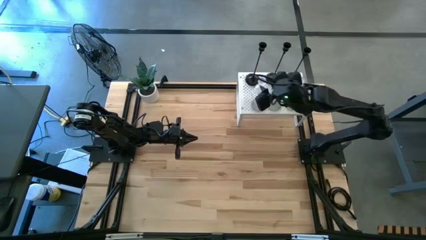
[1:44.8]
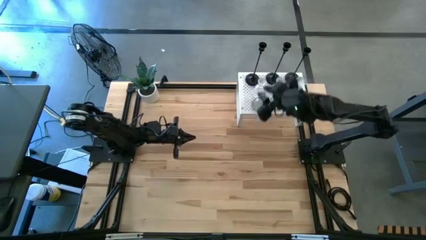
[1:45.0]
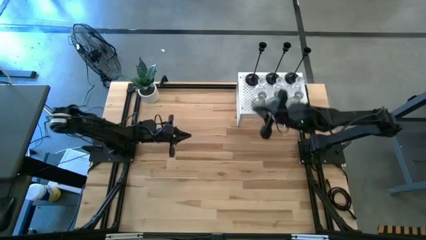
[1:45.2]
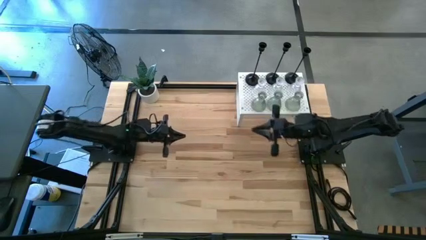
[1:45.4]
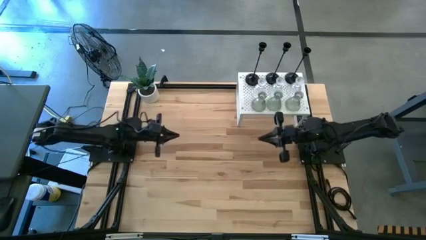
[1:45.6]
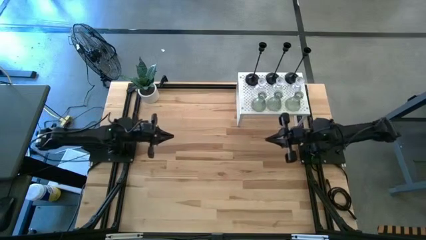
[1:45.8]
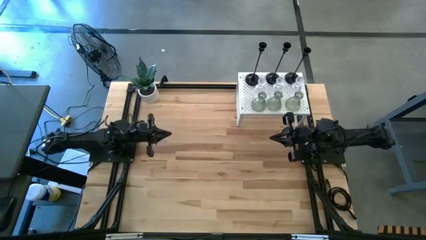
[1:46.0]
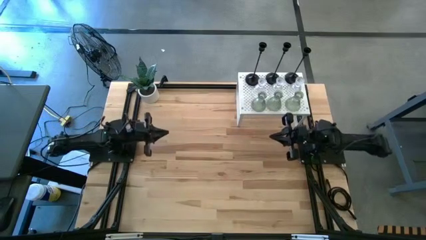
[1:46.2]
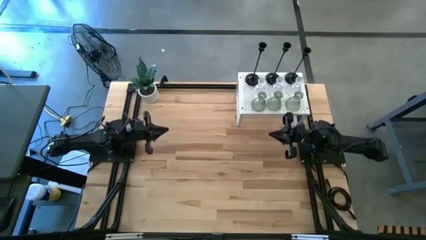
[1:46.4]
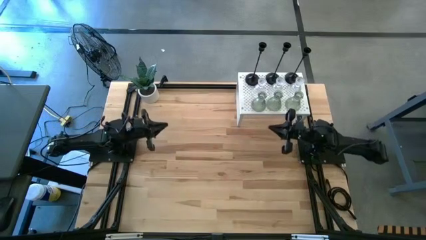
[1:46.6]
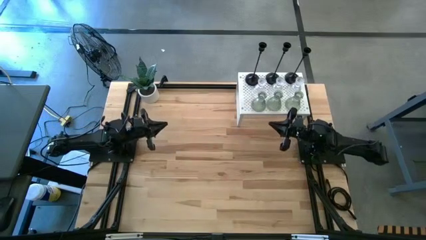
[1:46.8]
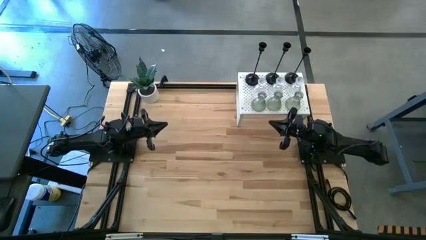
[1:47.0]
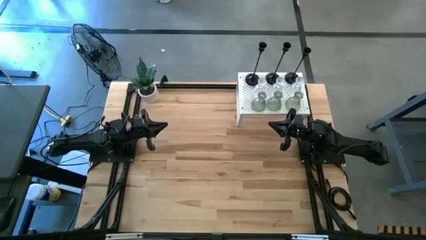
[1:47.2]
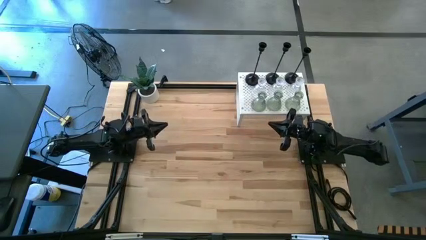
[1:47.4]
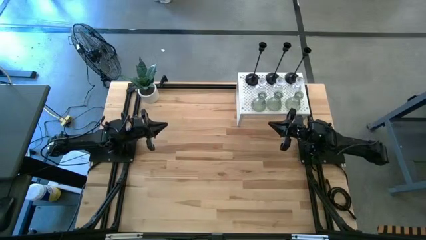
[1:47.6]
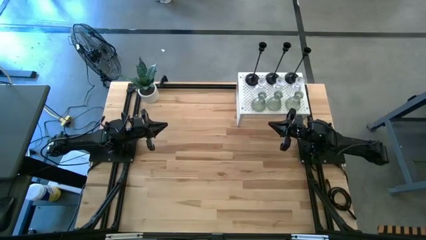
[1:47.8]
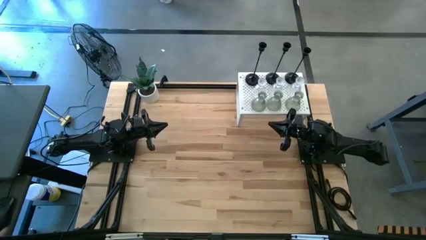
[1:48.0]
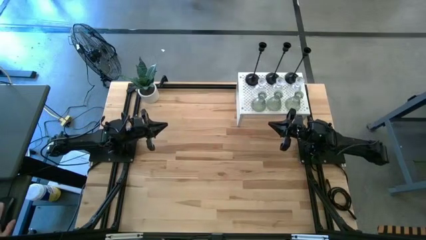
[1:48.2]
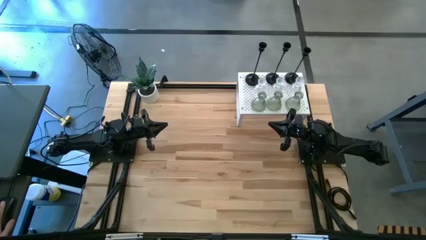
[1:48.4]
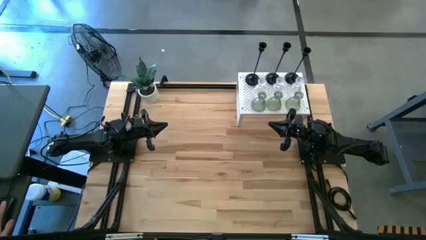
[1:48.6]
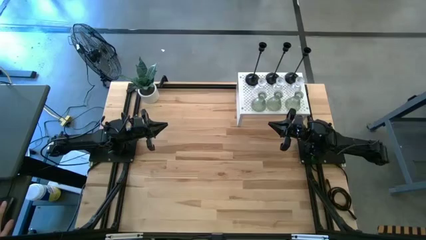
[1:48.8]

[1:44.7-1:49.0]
Task: Pick & Place candle stick holders
Return to Home Position

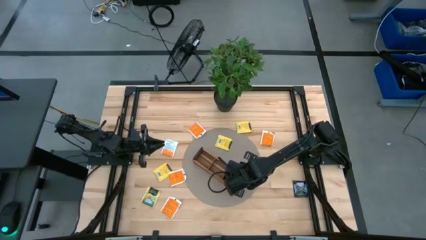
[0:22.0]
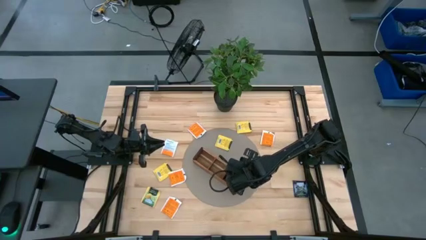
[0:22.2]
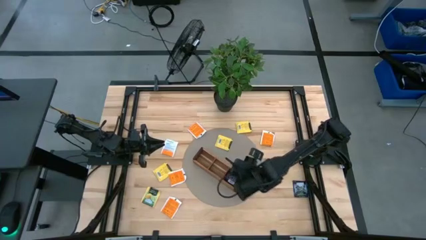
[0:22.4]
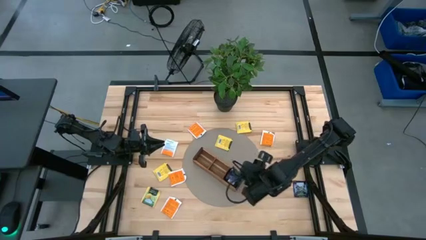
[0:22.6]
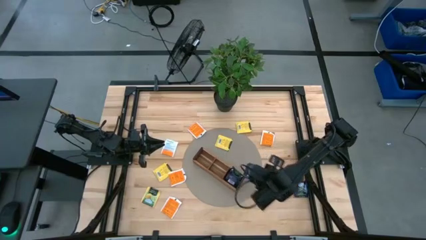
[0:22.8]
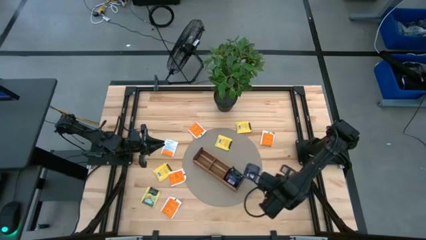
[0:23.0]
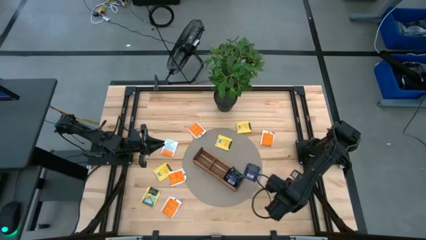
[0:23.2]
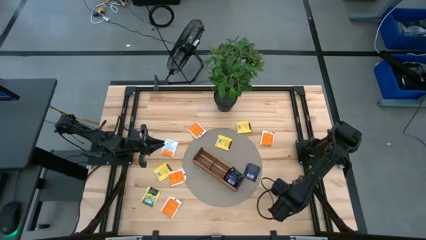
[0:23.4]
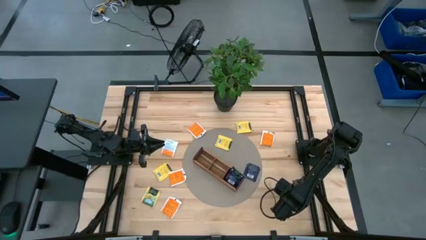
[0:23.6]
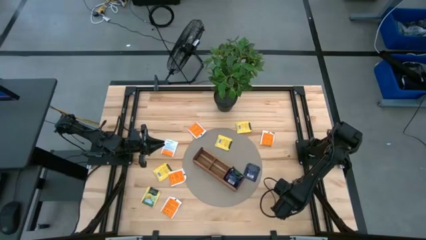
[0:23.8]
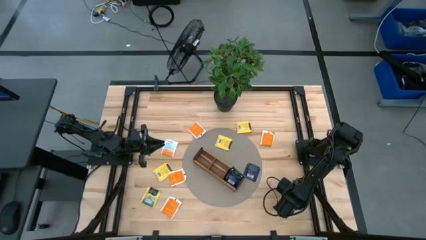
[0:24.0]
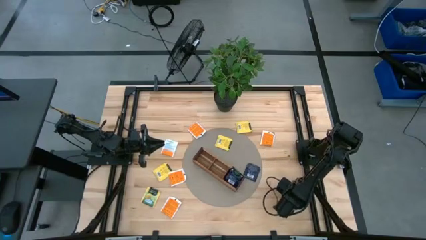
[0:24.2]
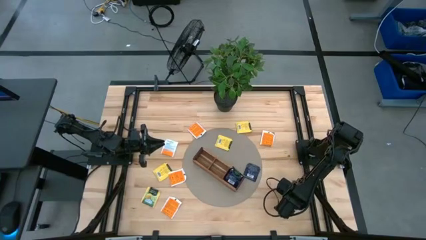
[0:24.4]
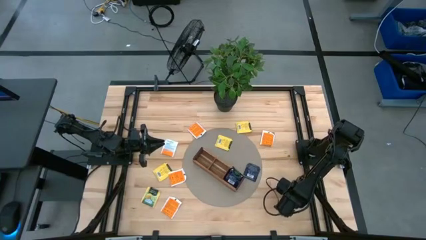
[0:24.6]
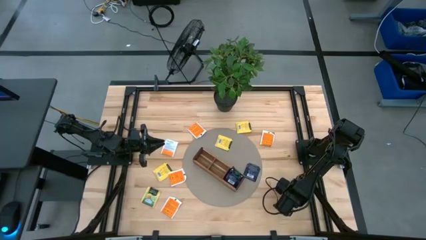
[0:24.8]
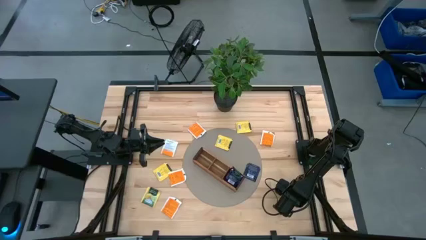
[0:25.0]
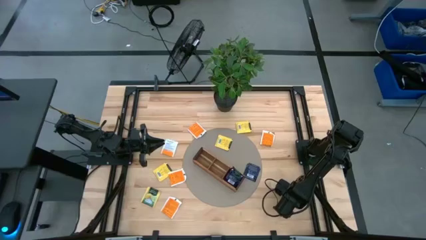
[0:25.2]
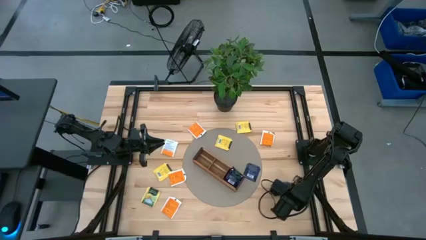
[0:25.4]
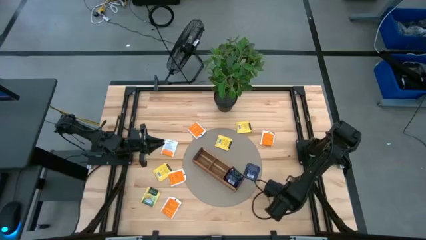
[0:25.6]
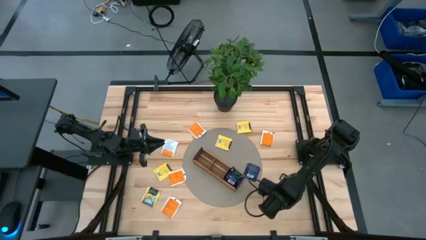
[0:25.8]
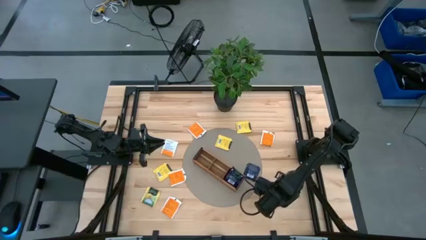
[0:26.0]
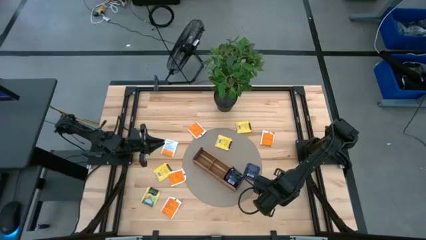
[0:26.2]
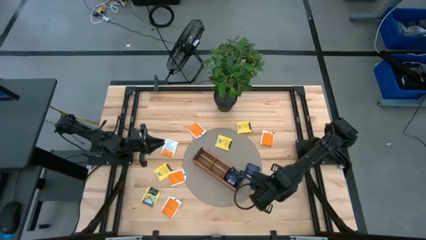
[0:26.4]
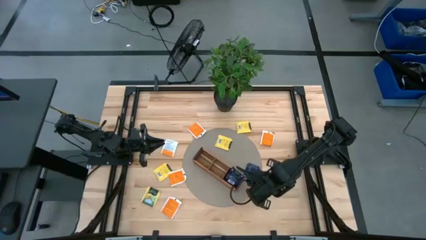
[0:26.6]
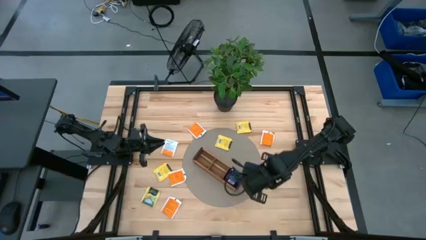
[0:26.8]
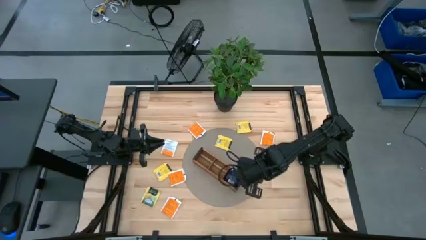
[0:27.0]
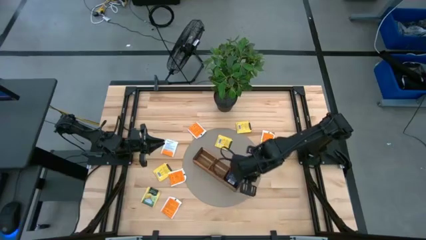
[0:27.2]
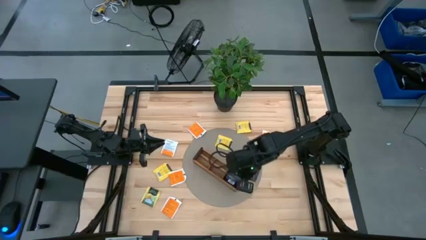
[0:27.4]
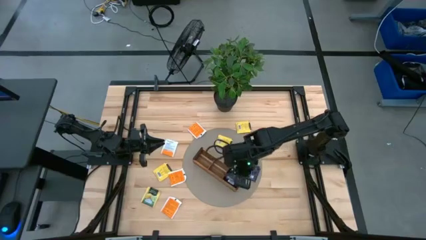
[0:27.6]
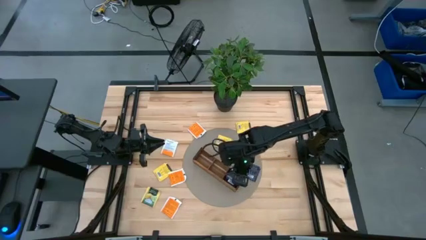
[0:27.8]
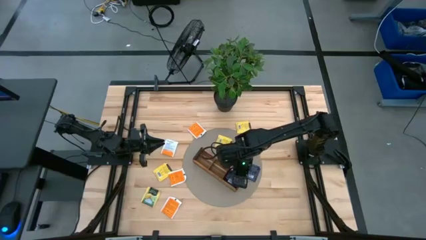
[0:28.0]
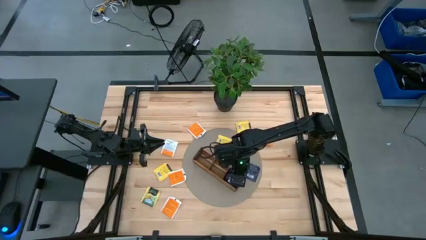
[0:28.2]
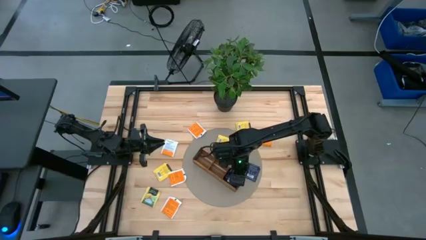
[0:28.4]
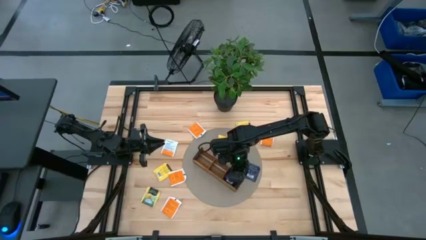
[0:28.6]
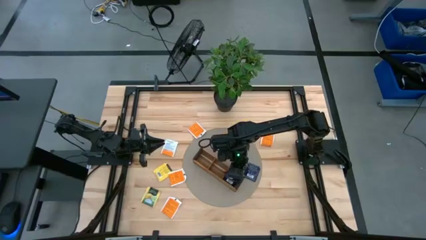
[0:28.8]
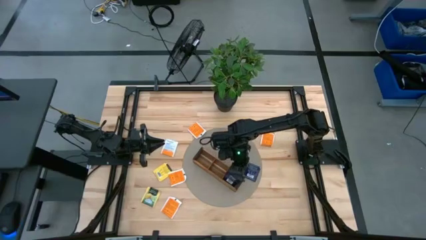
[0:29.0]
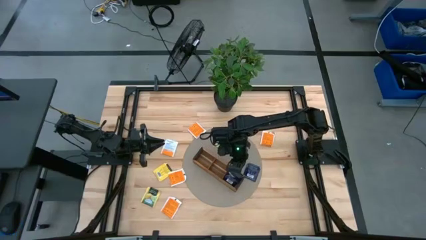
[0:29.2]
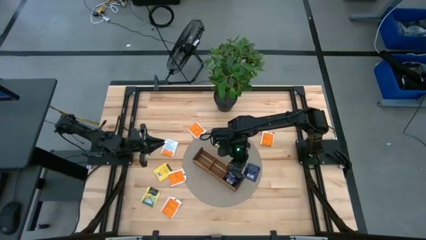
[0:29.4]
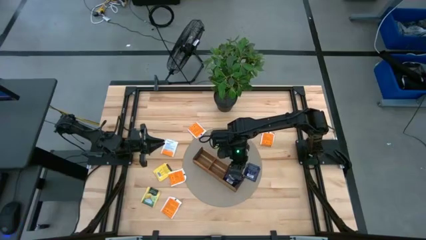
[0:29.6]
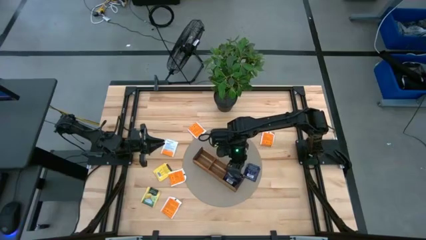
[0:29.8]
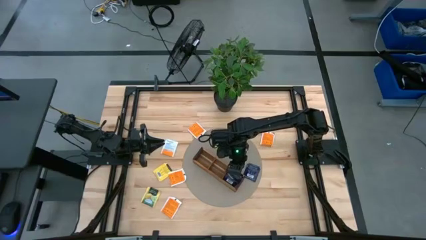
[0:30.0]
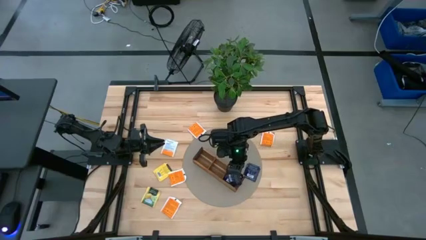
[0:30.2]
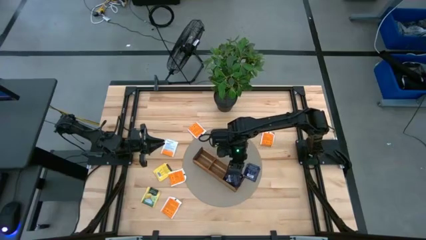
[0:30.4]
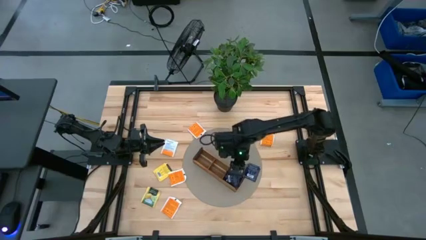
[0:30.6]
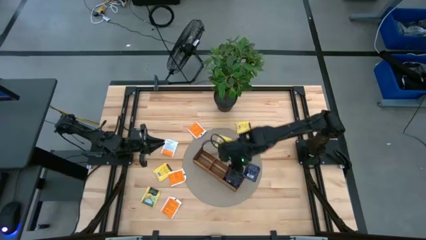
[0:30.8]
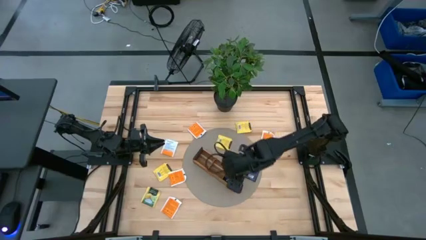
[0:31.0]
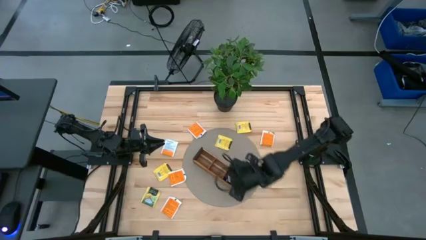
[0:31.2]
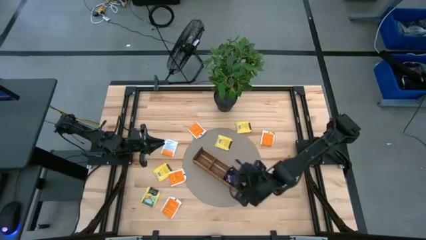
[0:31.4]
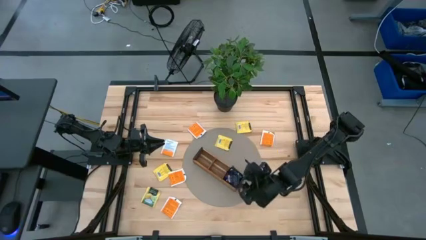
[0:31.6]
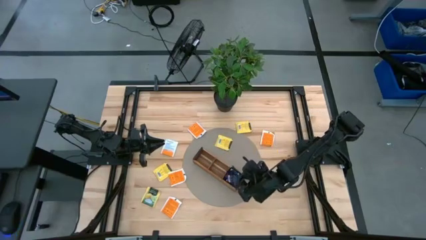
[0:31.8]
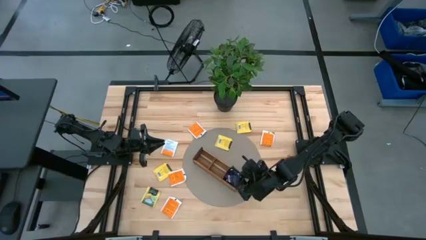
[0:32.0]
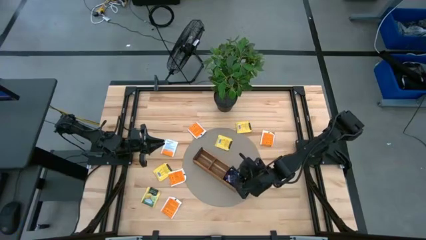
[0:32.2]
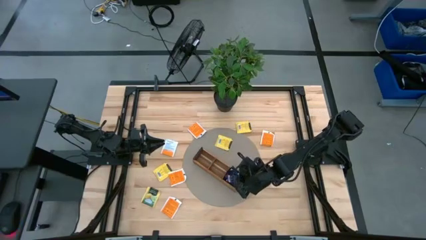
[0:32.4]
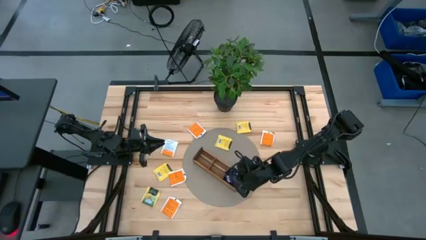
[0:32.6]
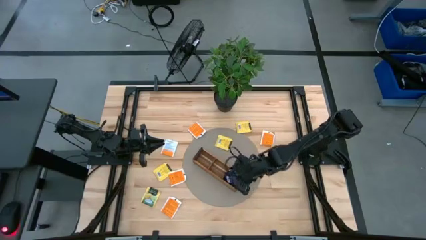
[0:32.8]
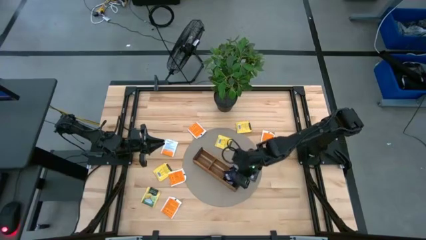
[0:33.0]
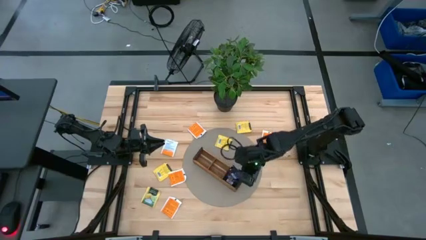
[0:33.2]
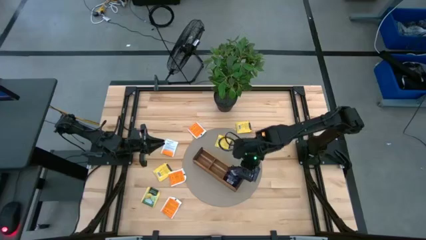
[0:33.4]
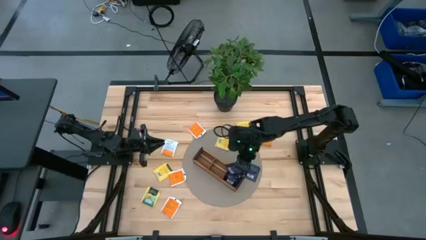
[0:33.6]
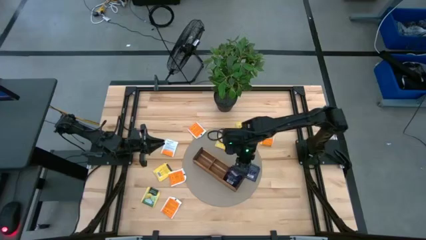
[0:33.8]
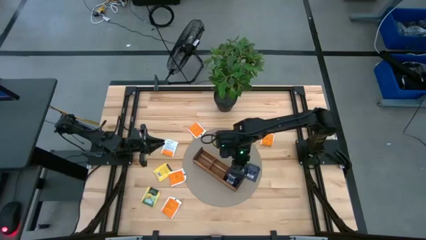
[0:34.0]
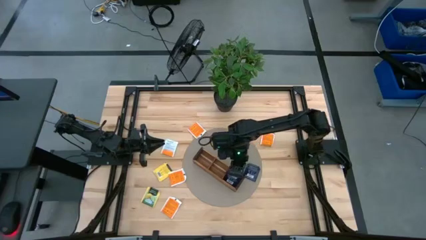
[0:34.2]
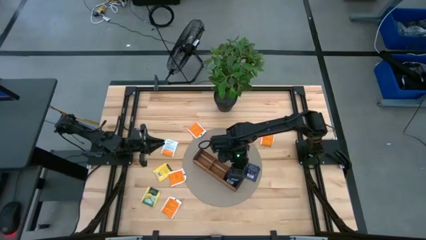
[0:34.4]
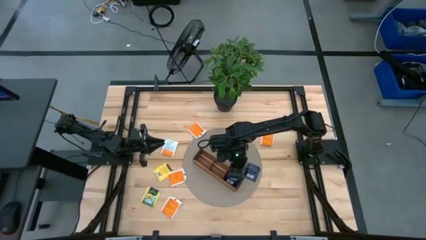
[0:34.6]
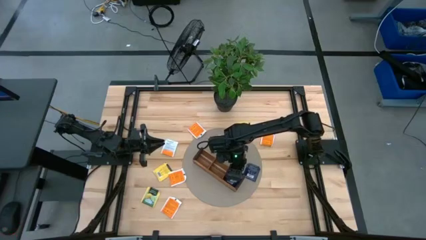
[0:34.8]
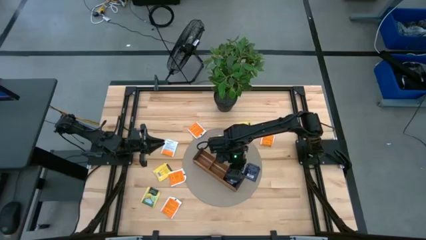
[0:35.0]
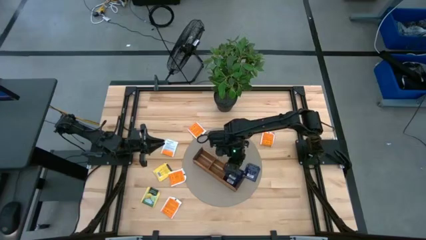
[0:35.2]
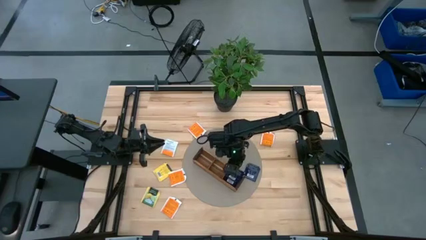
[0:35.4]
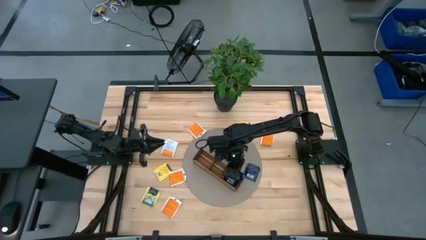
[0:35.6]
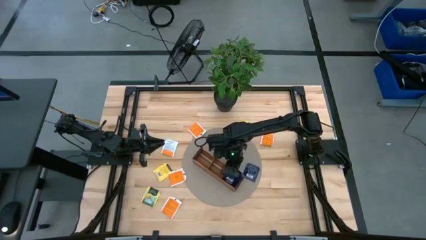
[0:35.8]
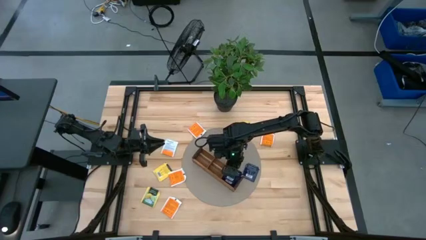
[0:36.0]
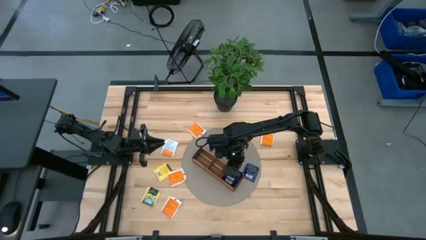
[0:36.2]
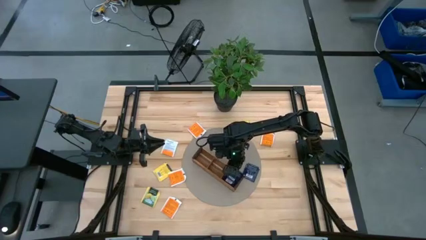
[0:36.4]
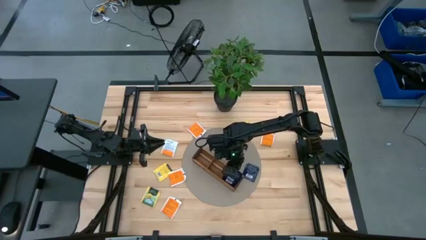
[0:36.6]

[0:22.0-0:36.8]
Task: Pick & Place Tea
Put the black tea bag into the right section of the wooden organizer
